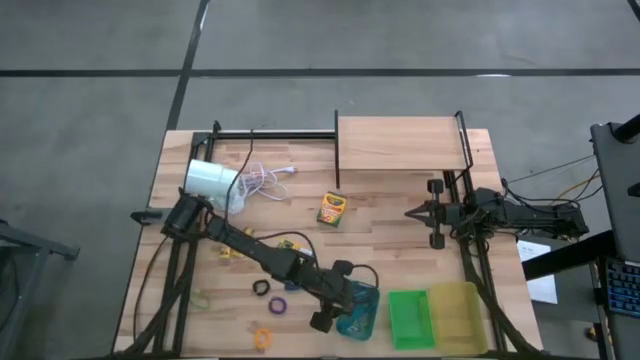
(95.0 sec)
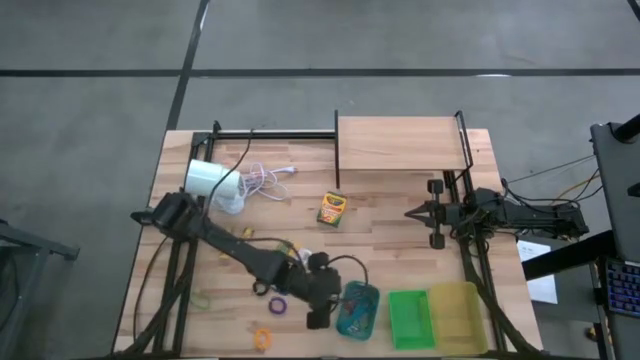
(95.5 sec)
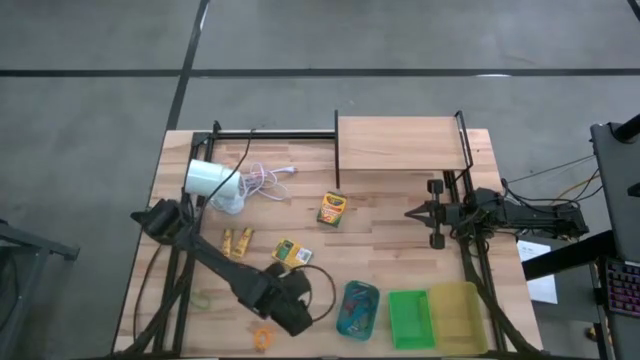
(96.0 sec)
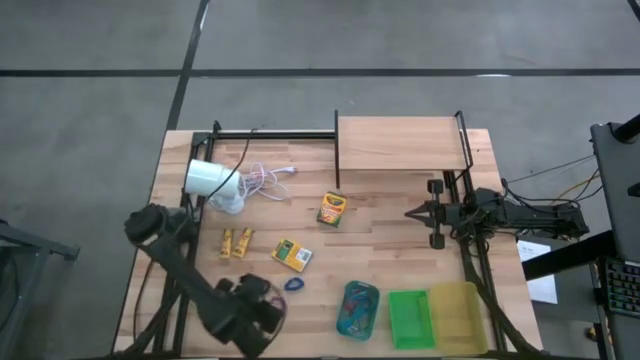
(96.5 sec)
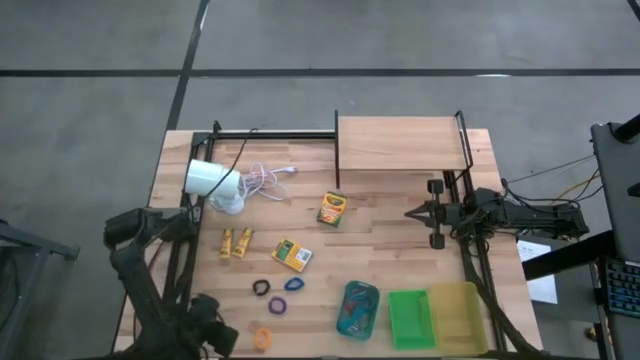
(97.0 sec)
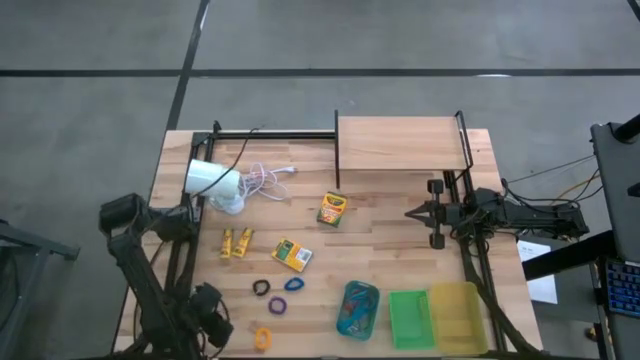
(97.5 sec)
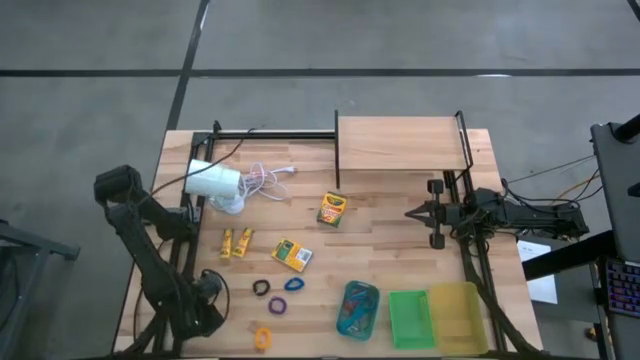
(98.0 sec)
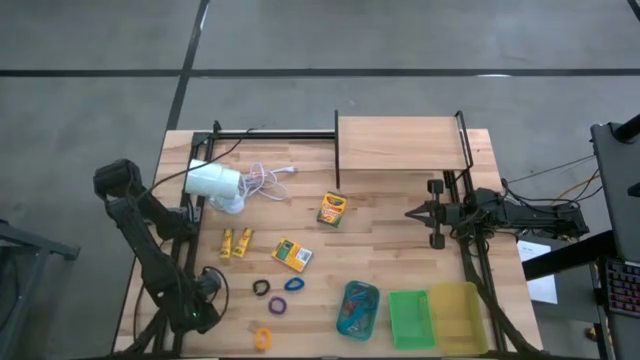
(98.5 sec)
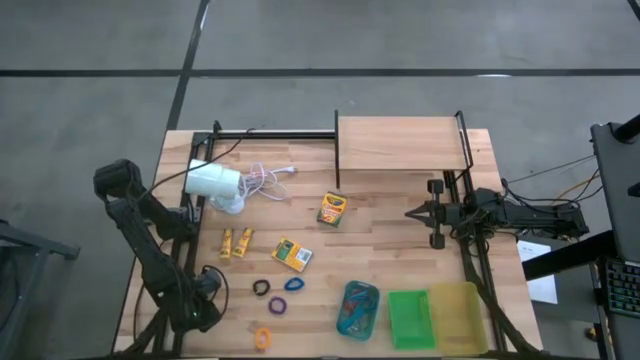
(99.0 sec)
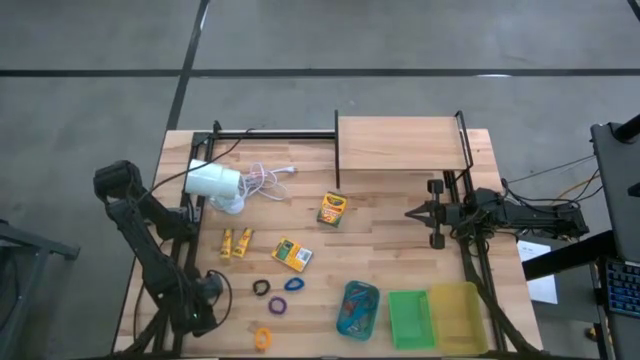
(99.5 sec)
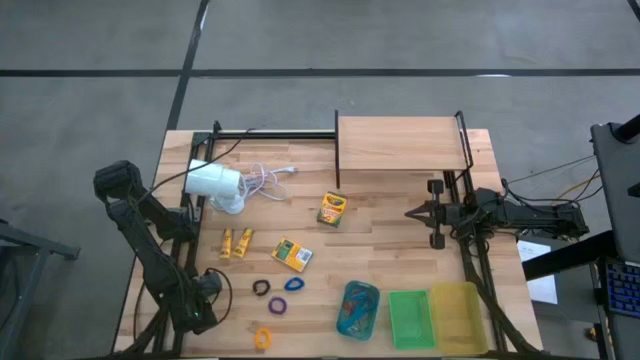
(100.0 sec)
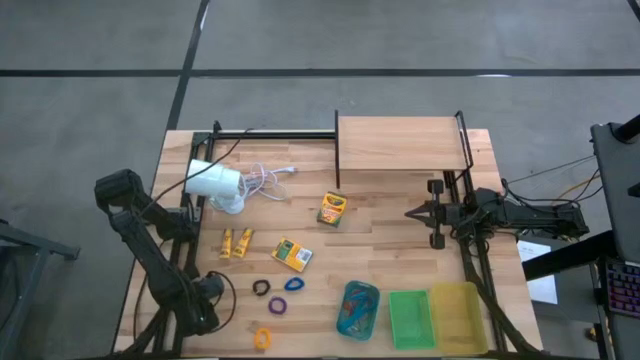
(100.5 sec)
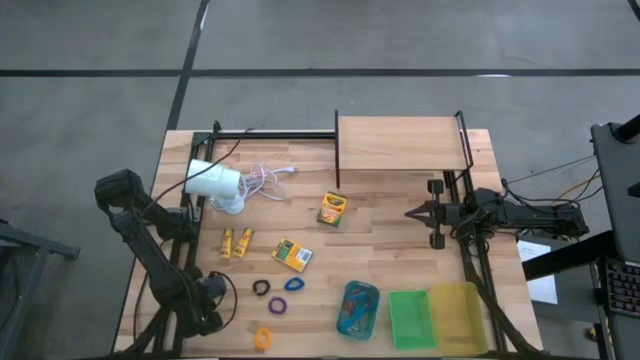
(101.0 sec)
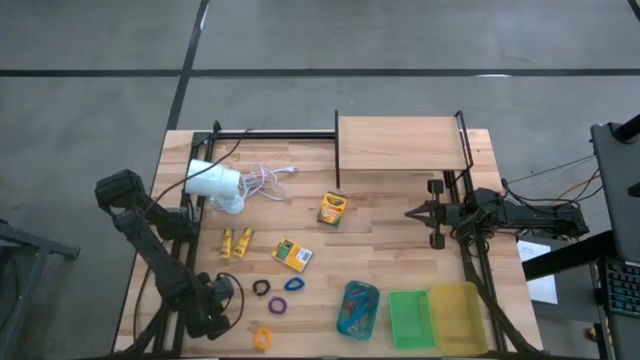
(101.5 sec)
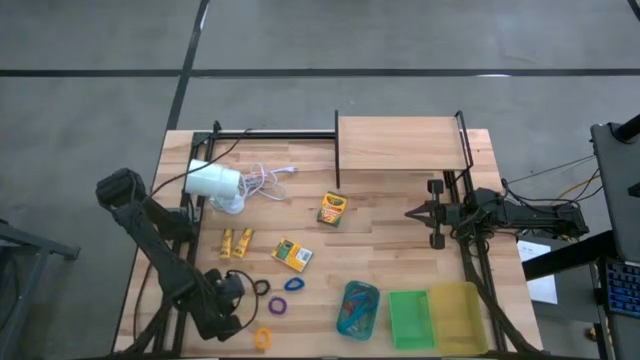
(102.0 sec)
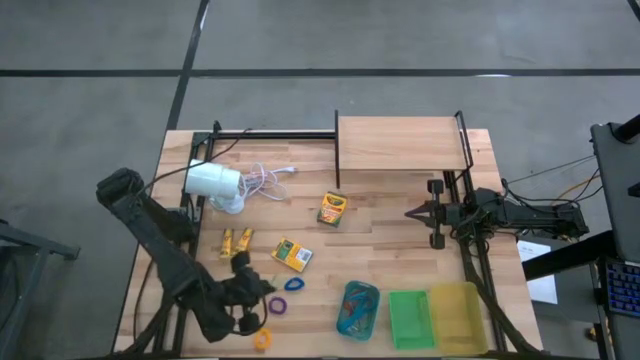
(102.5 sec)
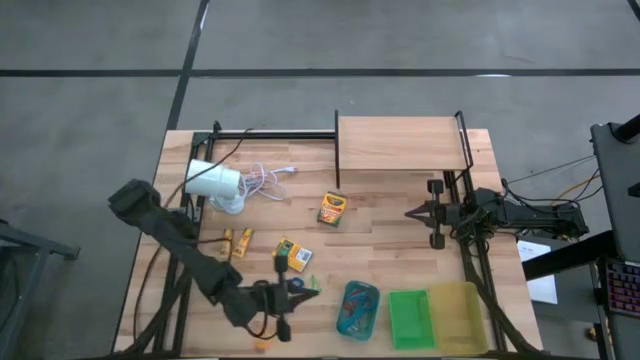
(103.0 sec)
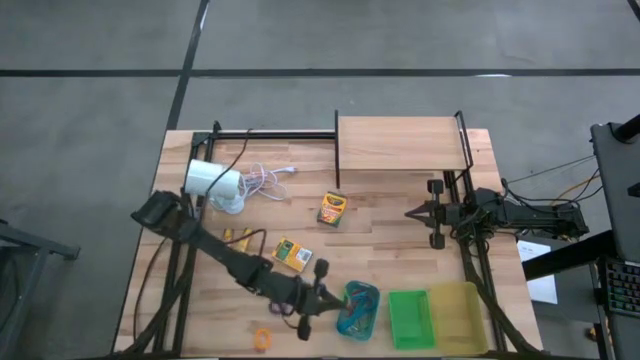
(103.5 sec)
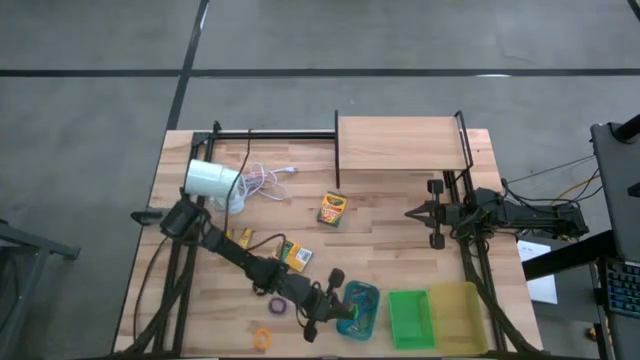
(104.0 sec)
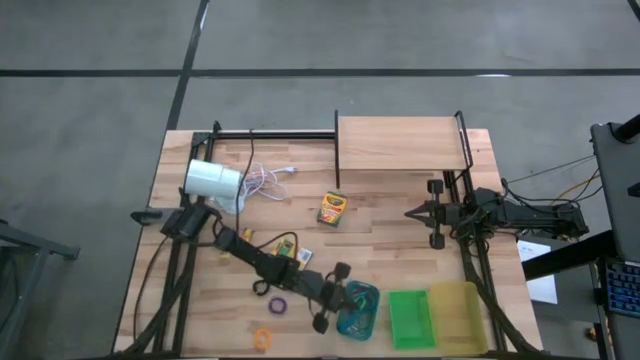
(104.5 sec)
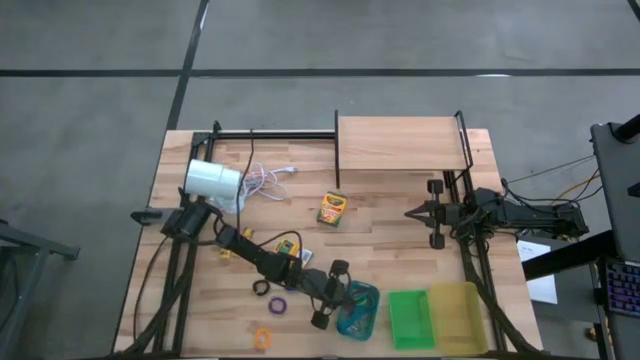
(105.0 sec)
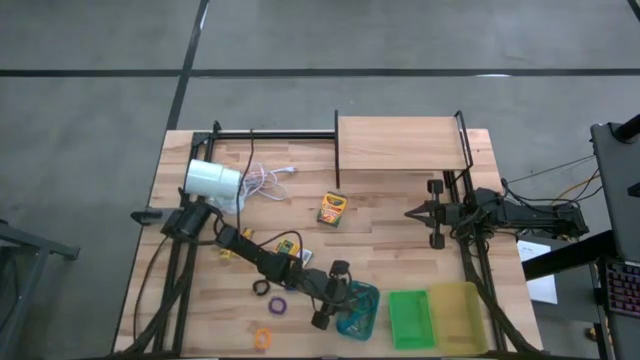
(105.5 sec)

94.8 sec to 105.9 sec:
Task: Pick & Place Office Desk Supplies
Put the green rubber band into the blue bin

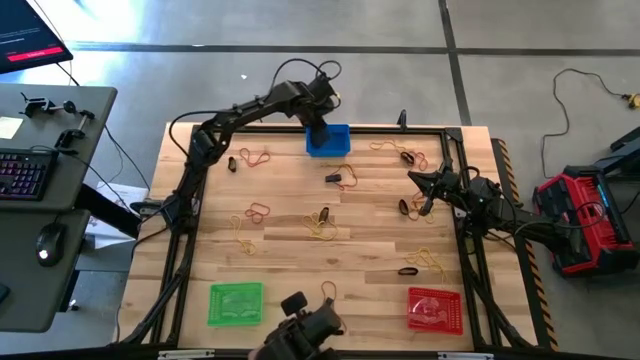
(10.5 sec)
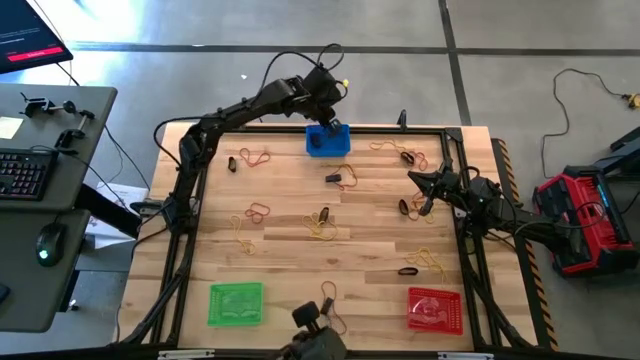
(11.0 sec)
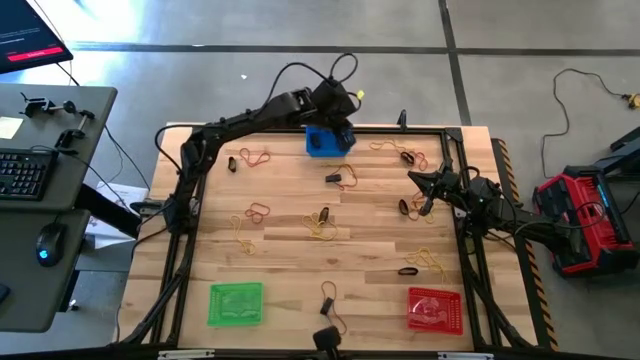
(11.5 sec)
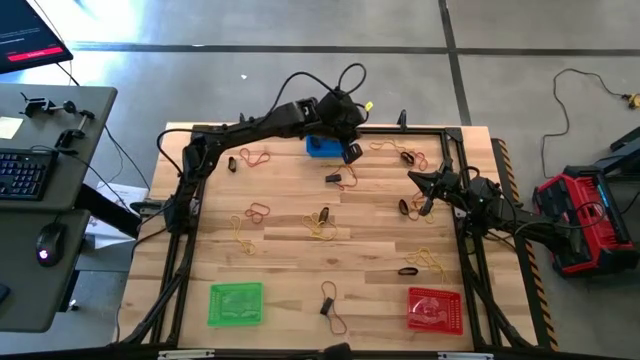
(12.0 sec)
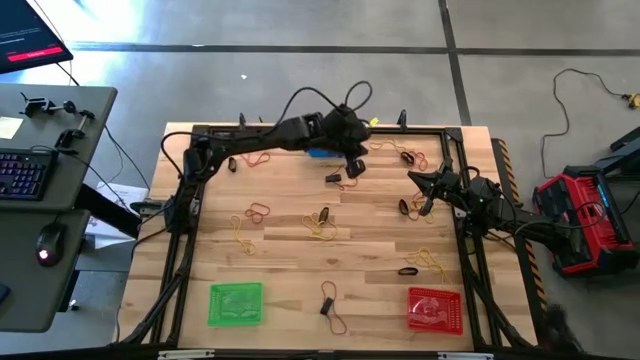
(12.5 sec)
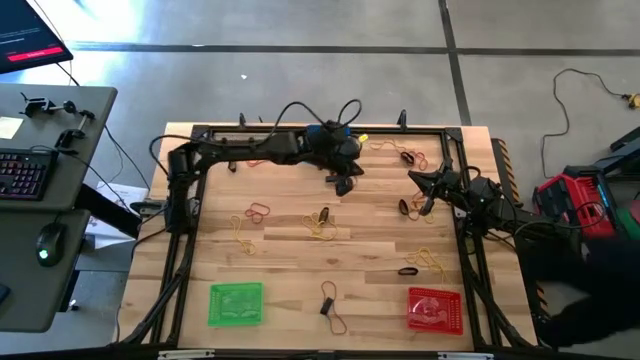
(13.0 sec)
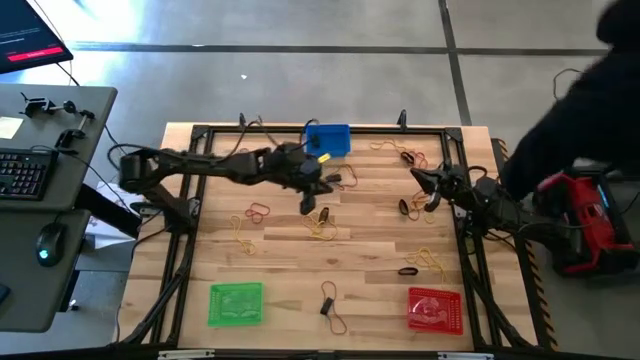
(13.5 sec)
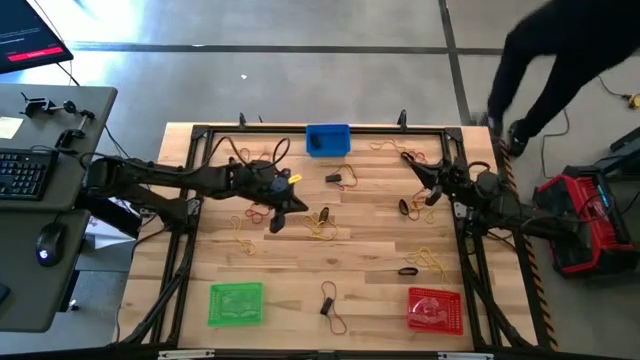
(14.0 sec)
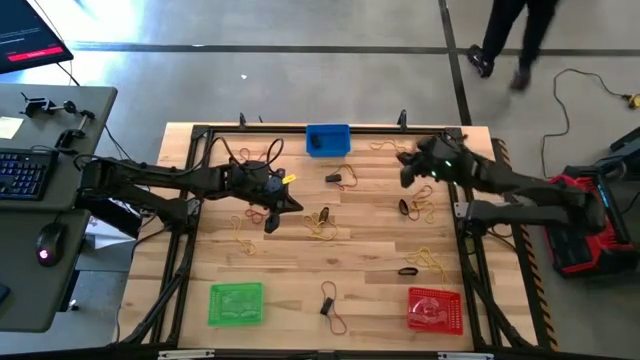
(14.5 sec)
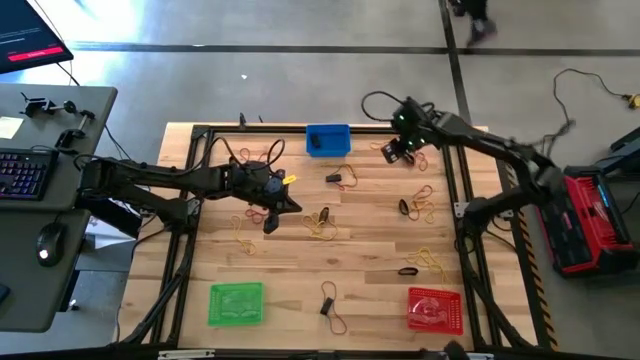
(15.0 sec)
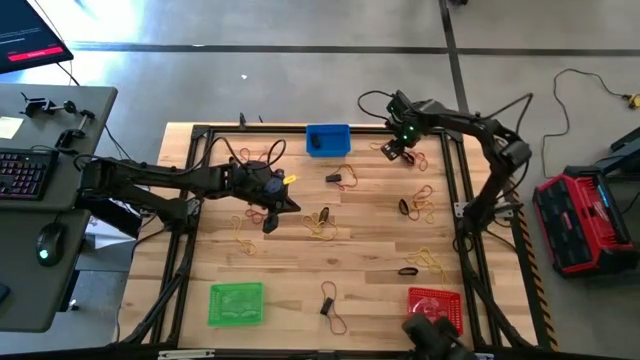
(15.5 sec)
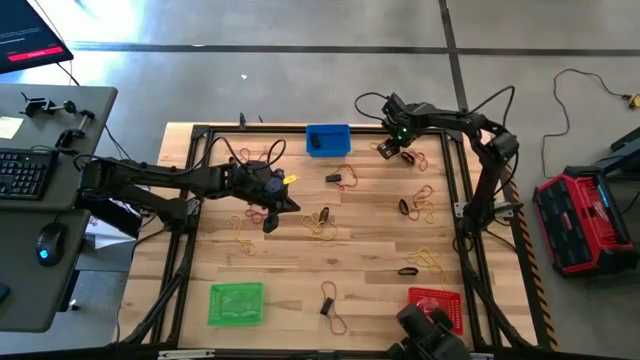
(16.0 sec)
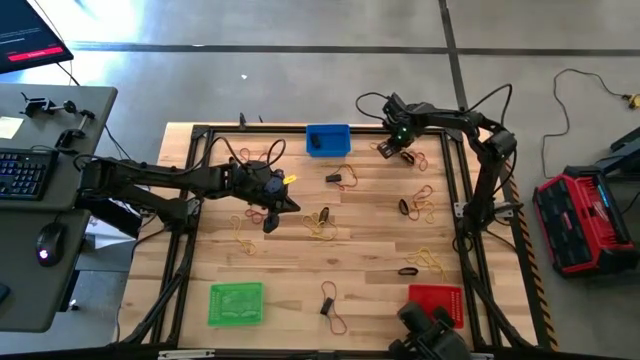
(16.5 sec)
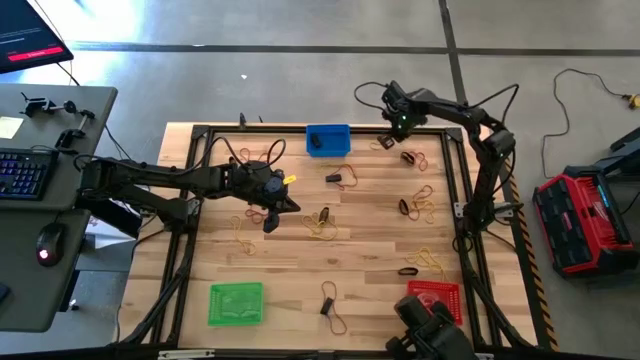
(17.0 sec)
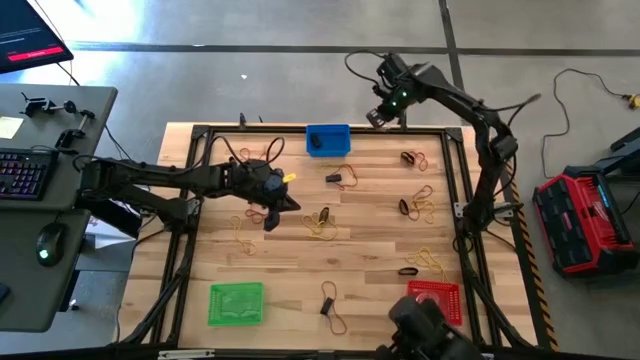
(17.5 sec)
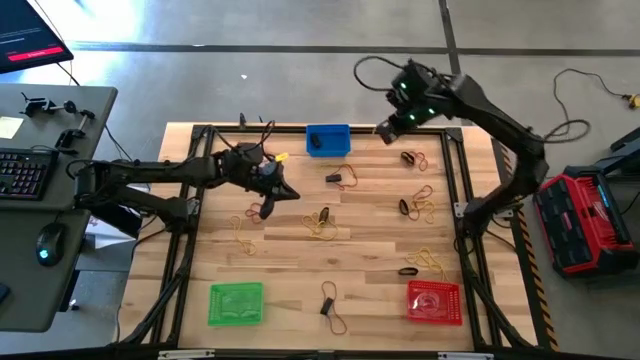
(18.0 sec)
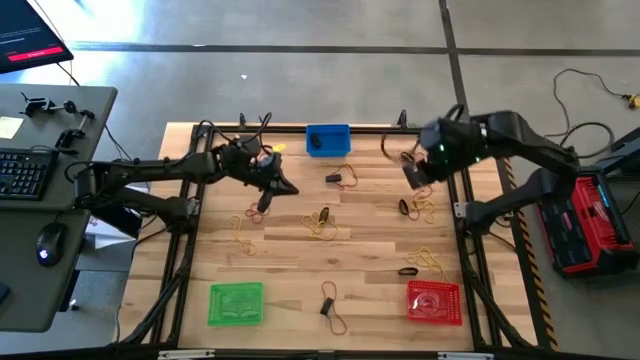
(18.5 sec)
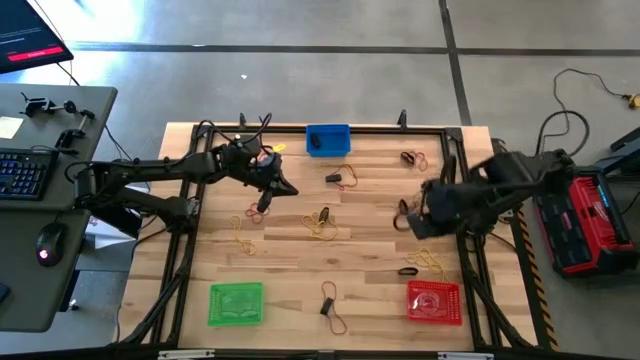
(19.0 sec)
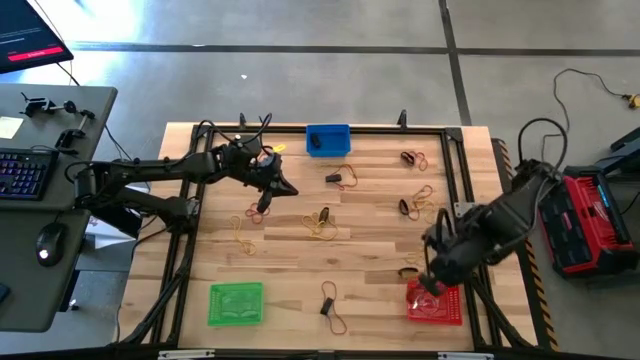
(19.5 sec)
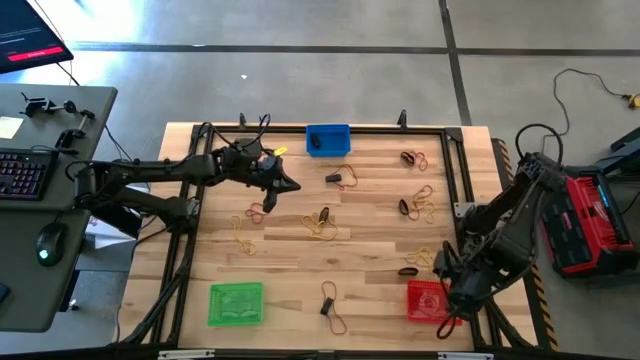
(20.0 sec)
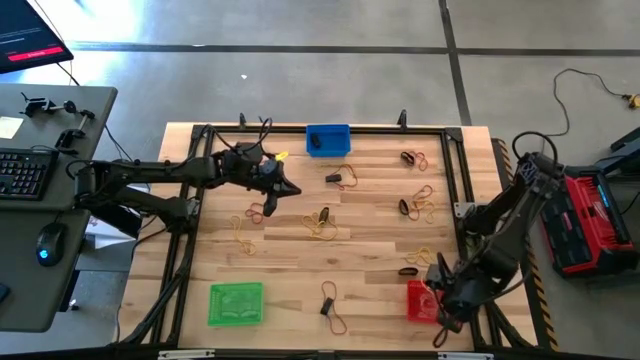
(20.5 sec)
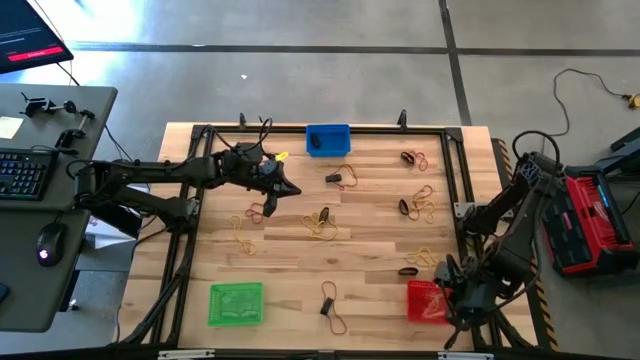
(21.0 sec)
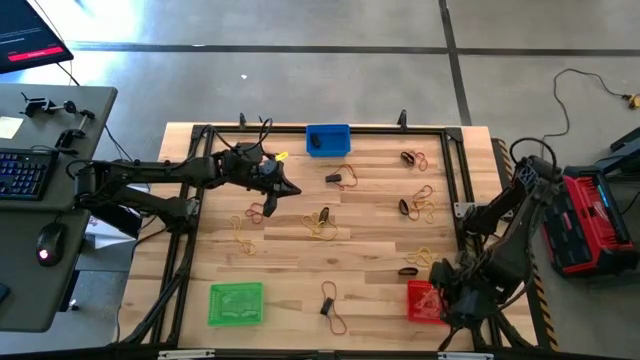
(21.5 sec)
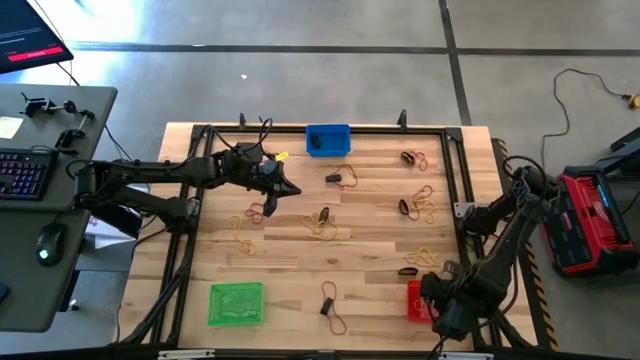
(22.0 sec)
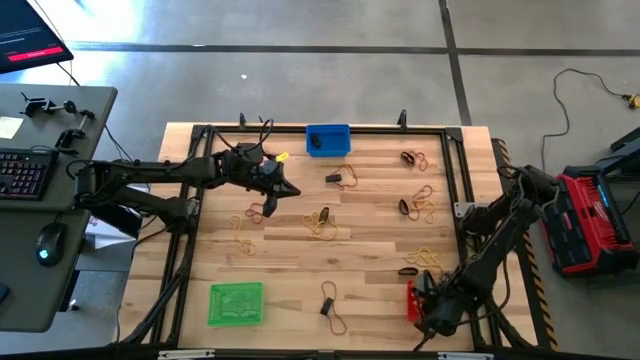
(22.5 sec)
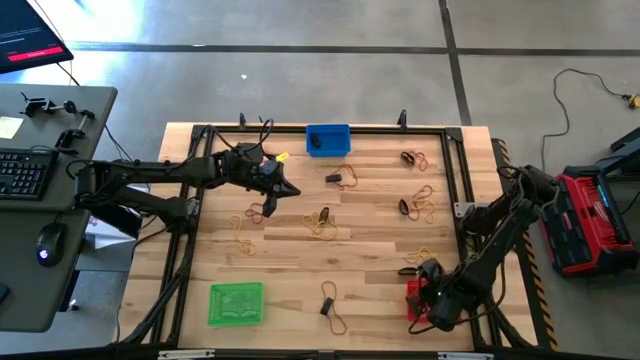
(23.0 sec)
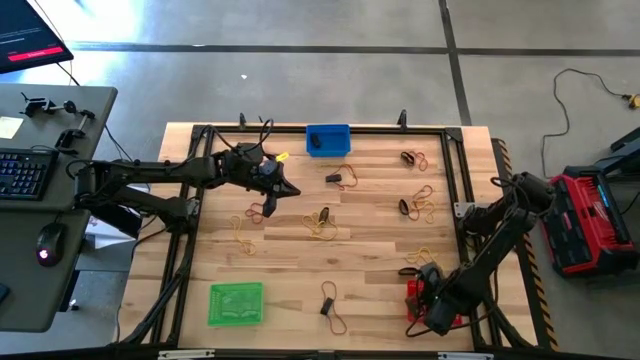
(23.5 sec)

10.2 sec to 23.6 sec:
Task: Sort rubber bands into baskets
Put the yellow rubber band into the red basket
